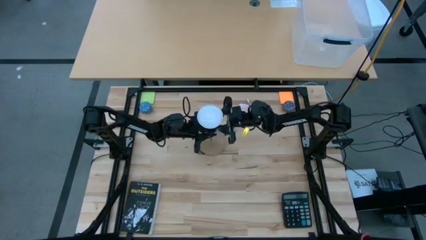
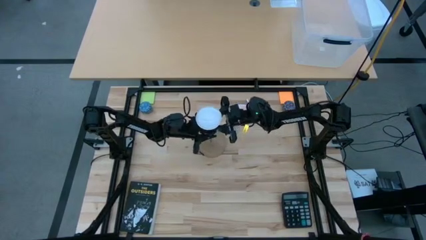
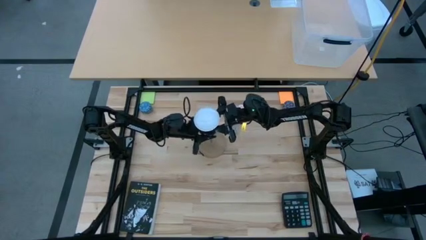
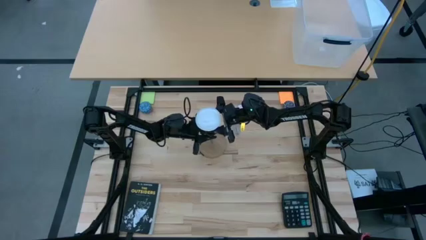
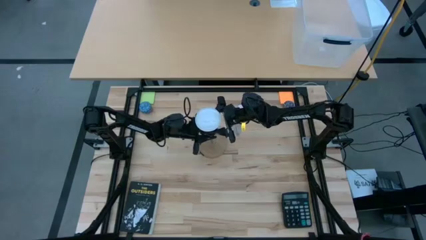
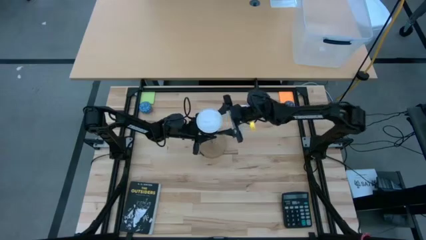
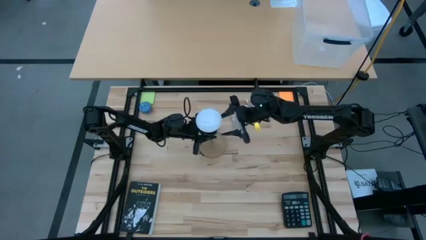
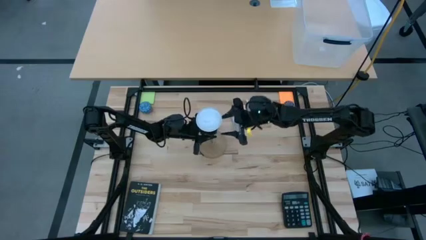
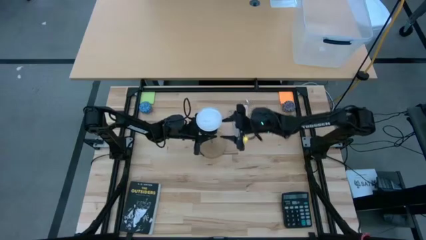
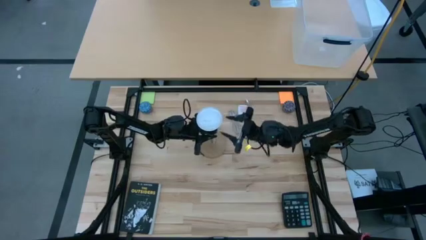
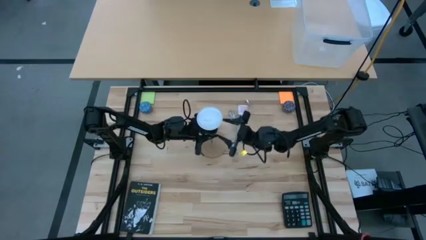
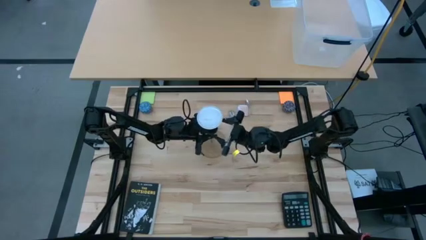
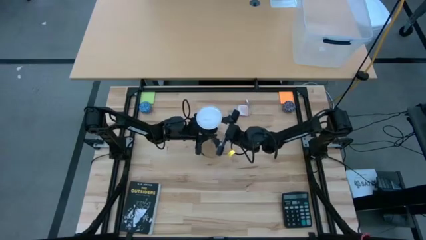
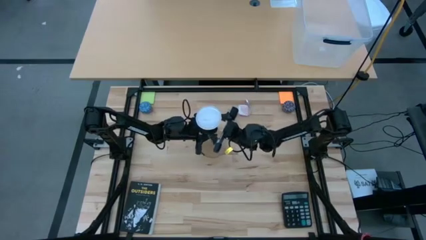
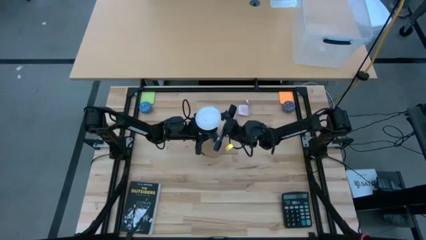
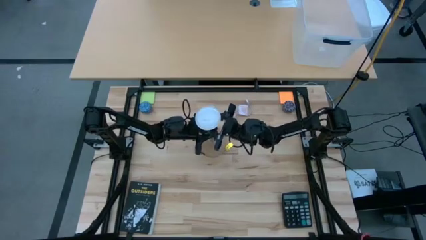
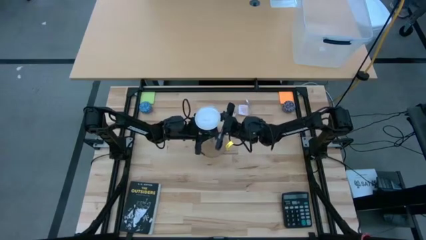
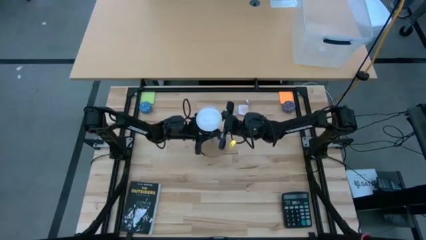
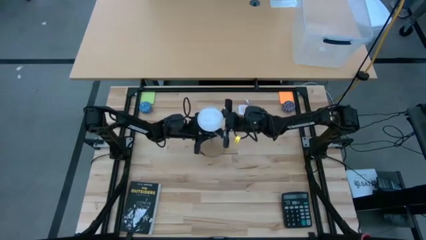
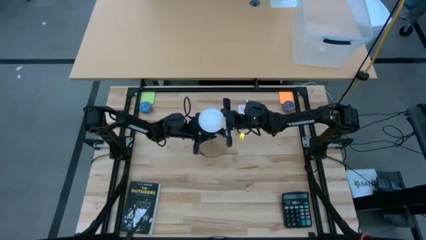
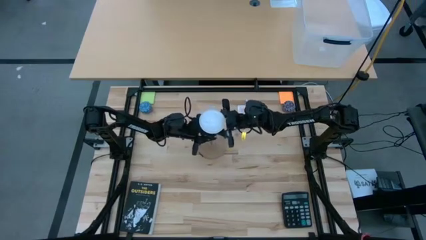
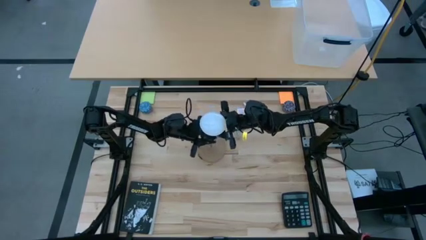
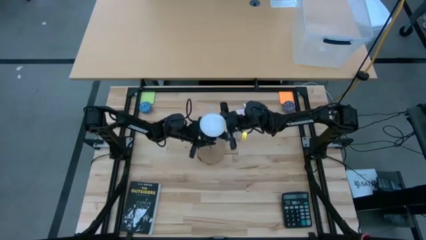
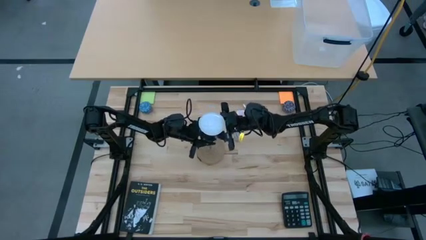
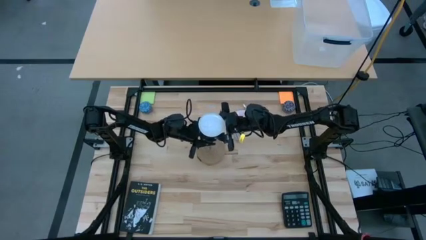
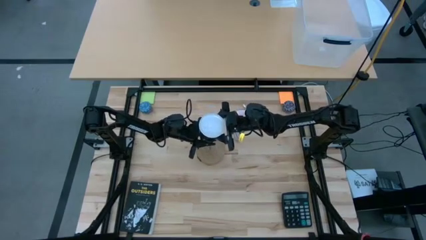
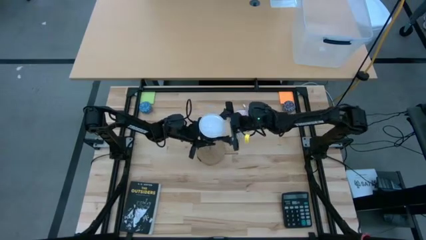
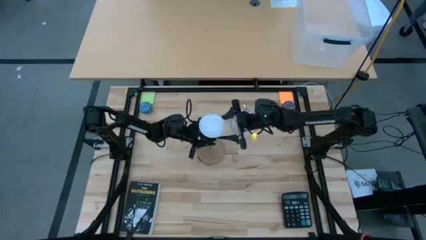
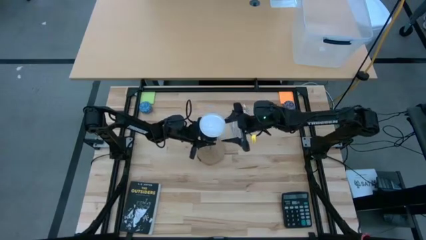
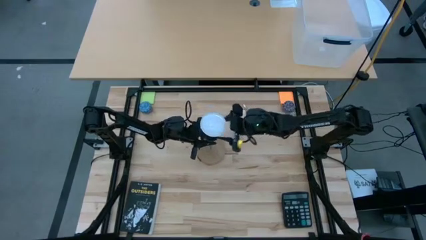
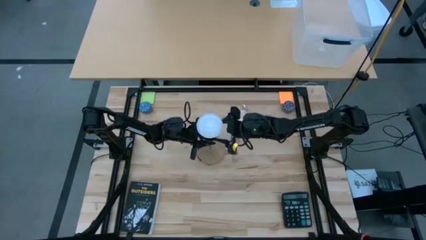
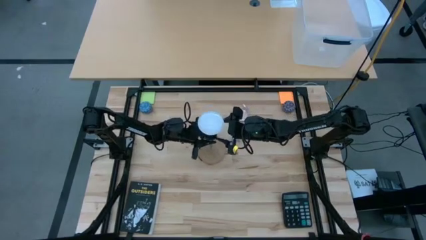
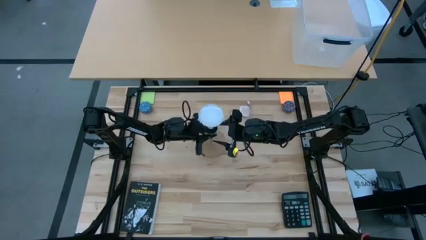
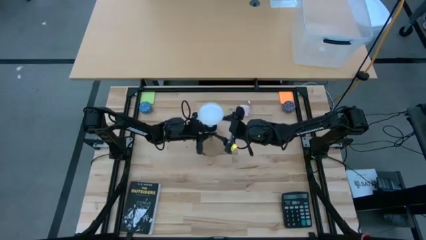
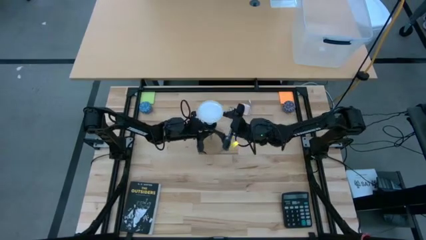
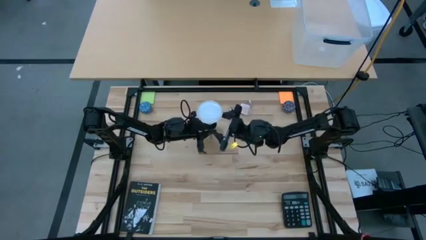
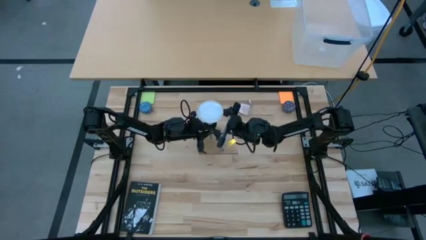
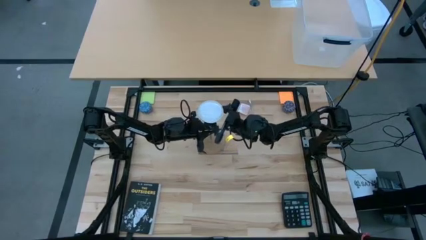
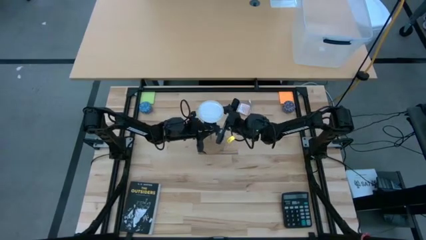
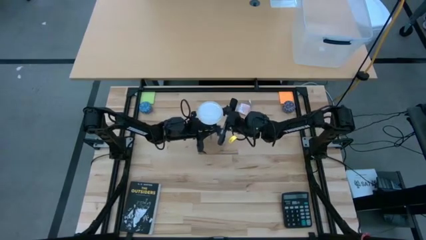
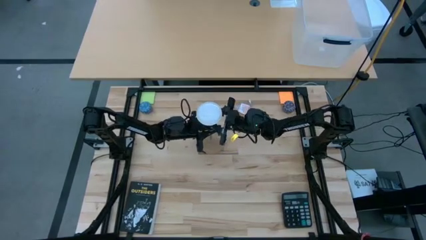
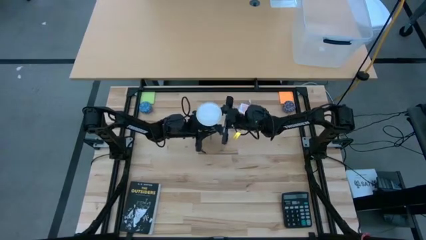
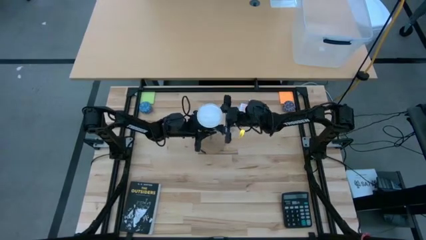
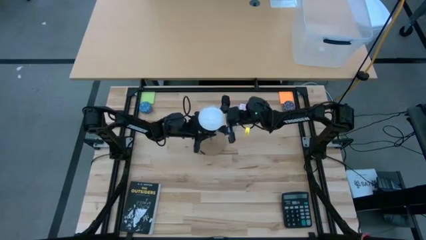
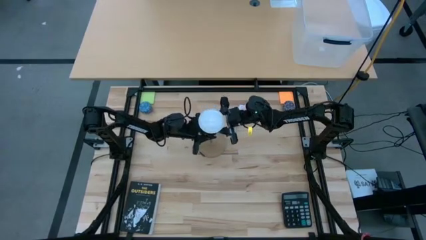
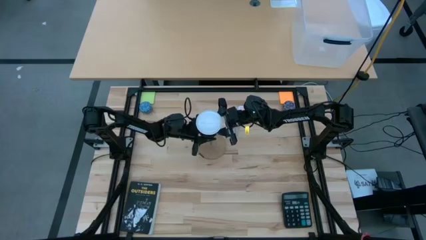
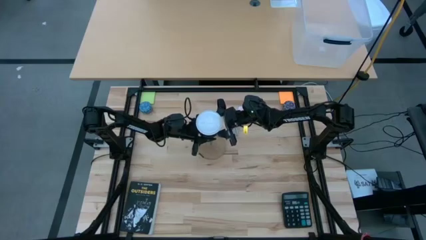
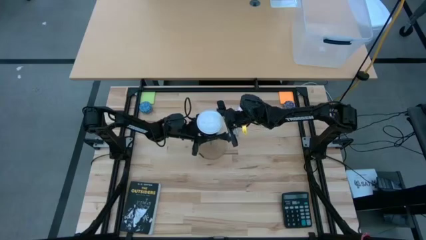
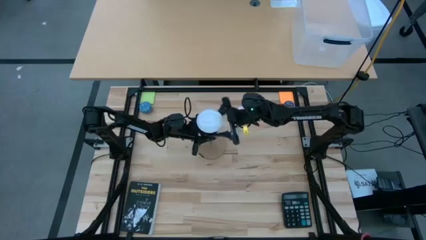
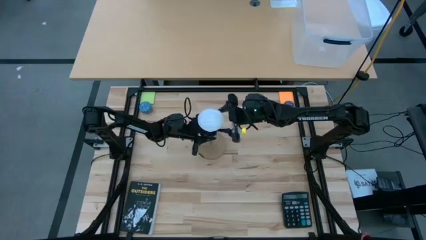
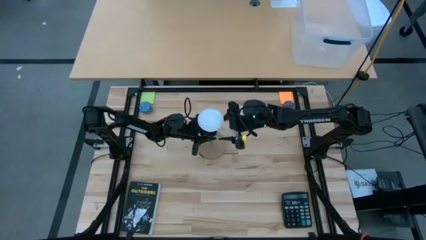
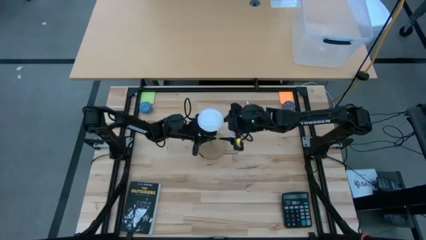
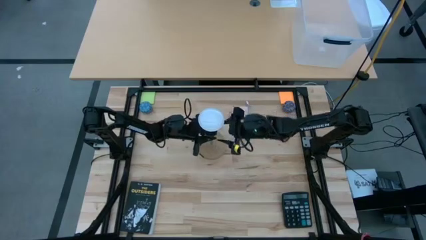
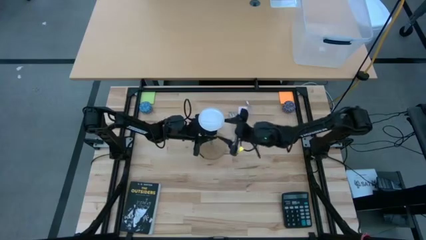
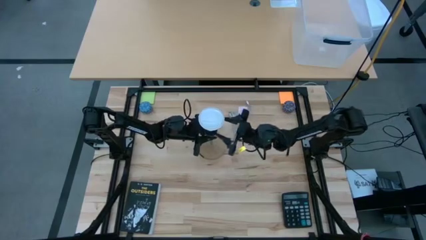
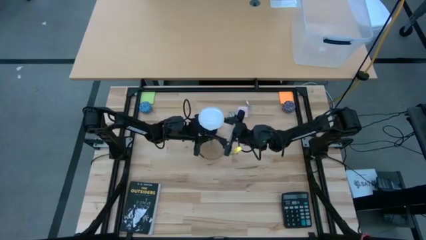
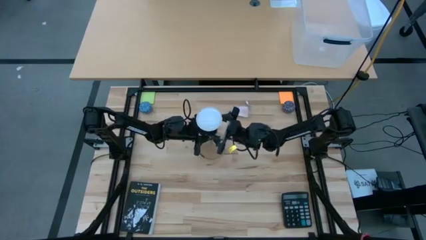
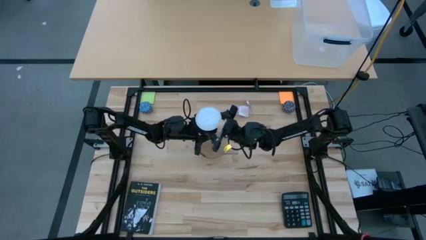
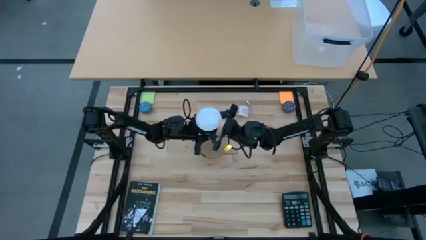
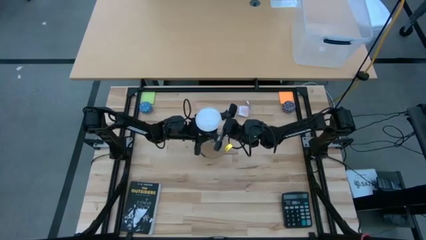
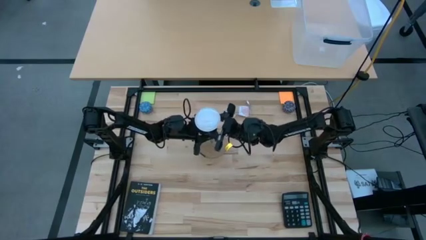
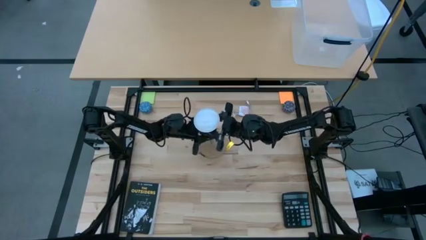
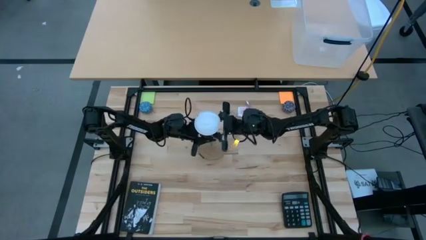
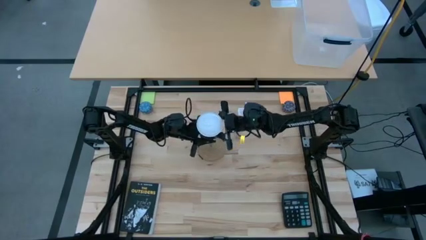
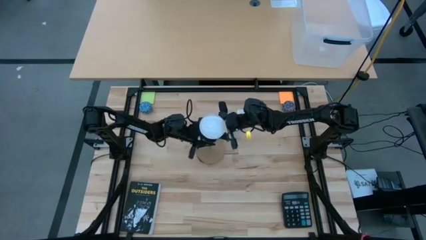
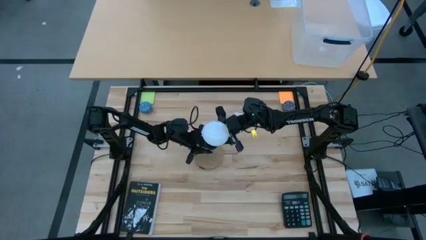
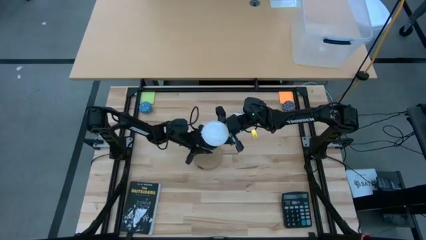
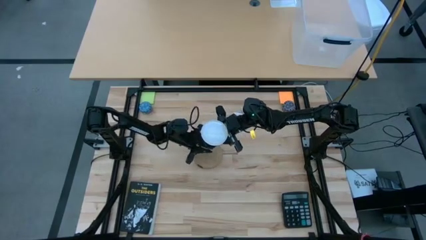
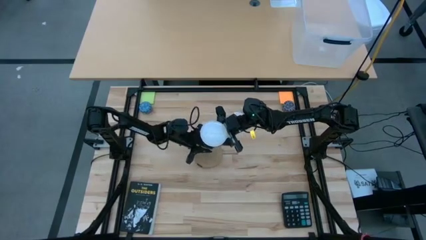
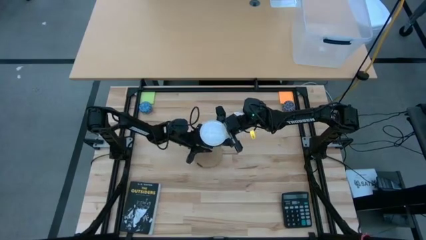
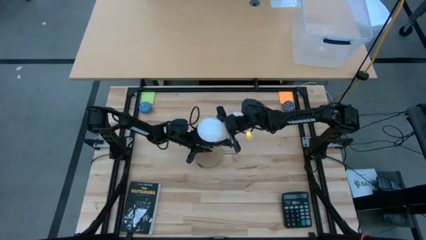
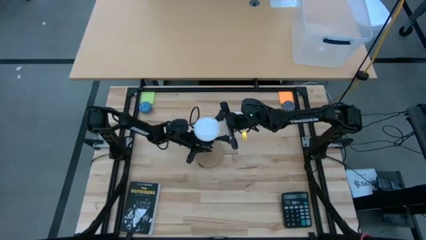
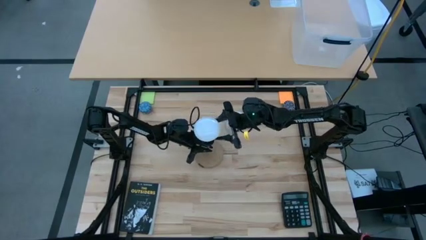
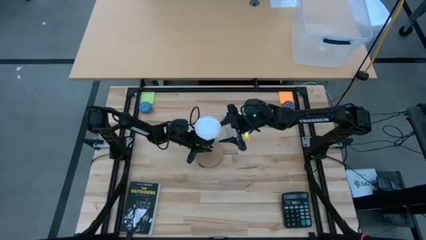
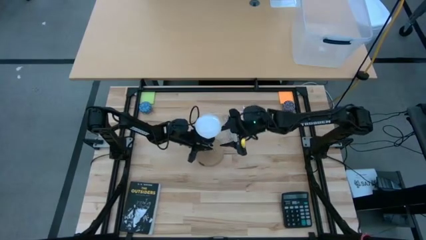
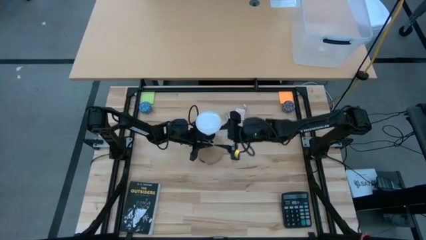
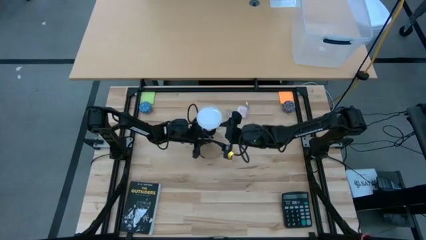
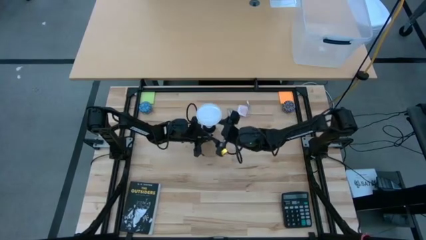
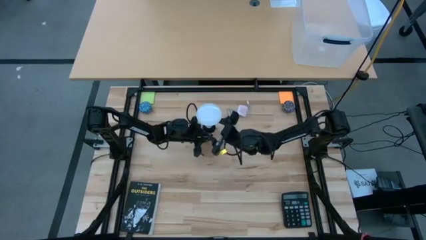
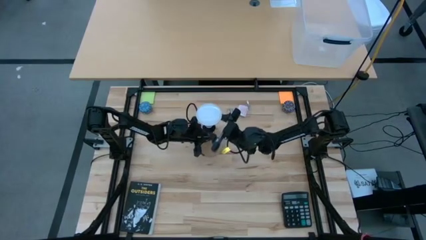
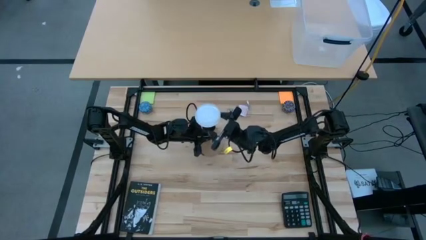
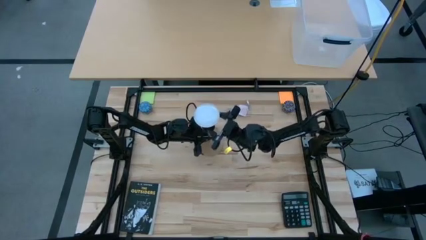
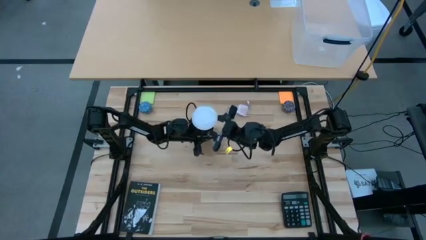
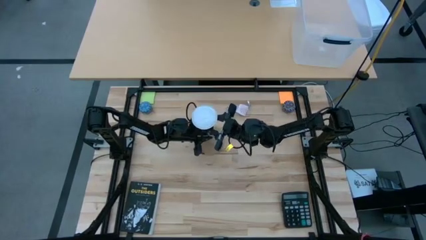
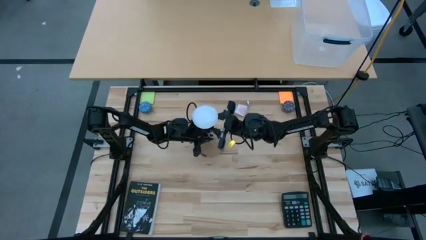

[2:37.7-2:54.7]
Task: Screw lightbulb
Remove the lightbulb from the lamp
